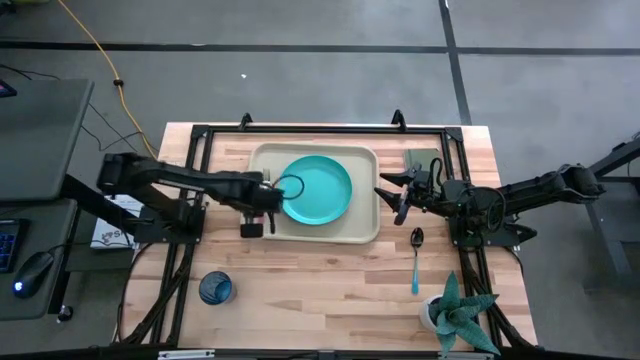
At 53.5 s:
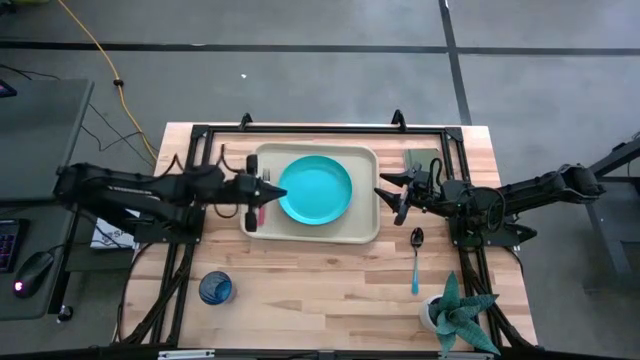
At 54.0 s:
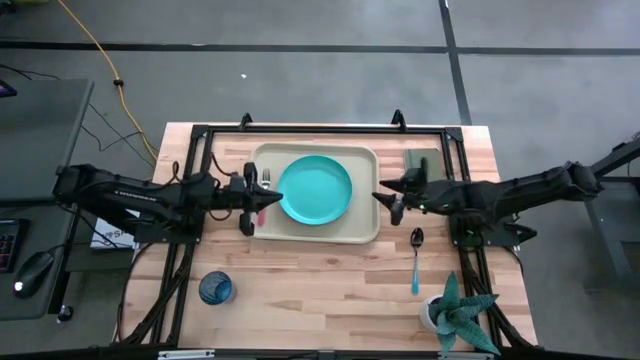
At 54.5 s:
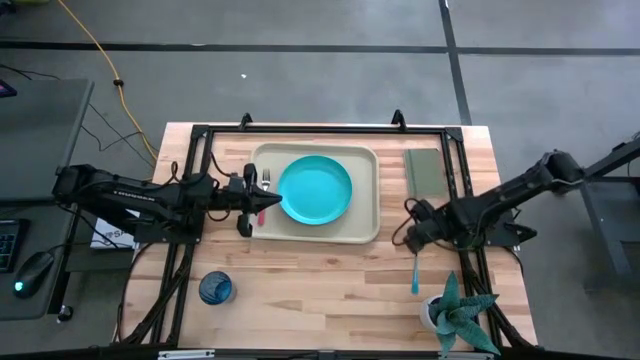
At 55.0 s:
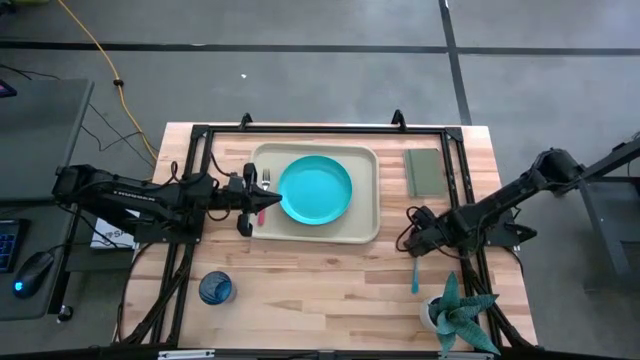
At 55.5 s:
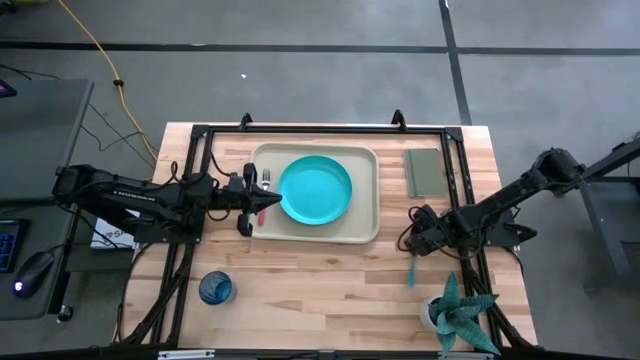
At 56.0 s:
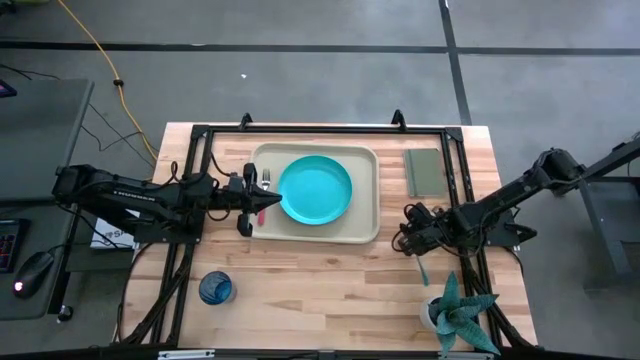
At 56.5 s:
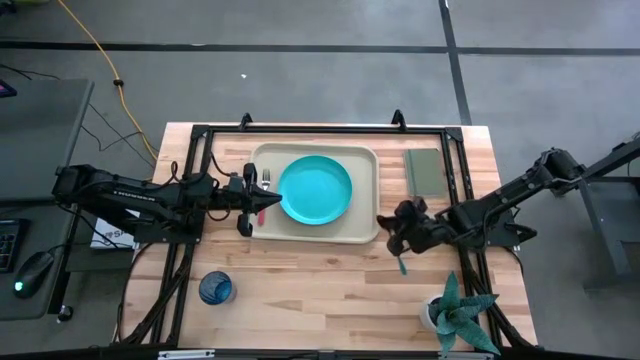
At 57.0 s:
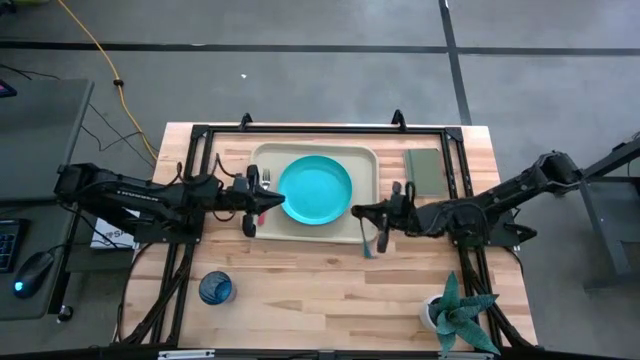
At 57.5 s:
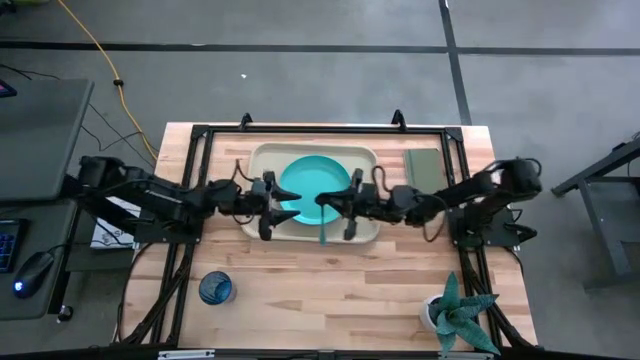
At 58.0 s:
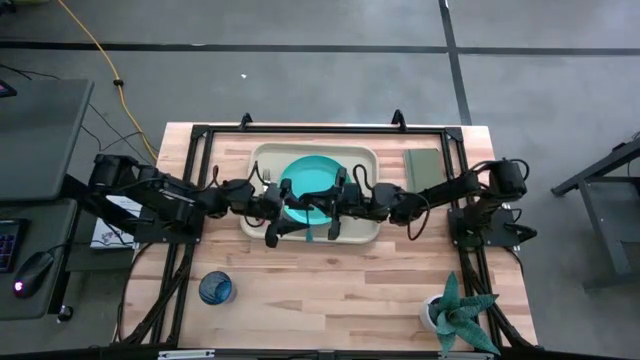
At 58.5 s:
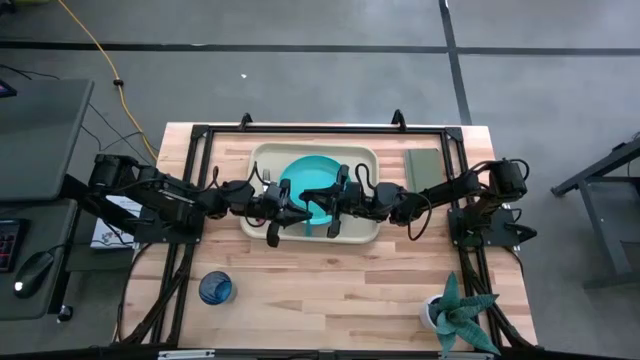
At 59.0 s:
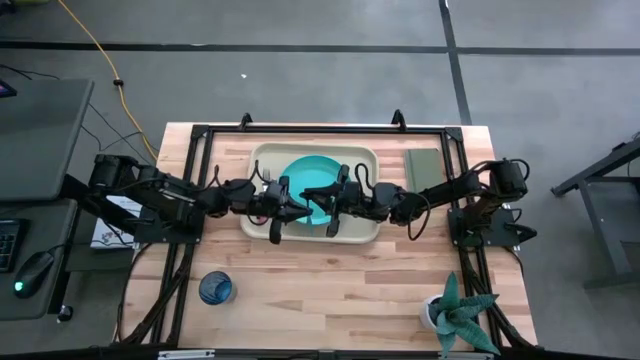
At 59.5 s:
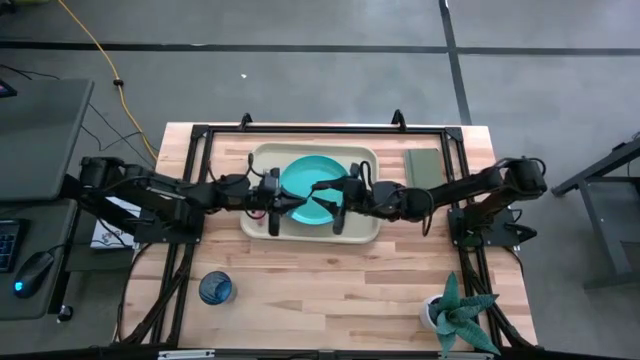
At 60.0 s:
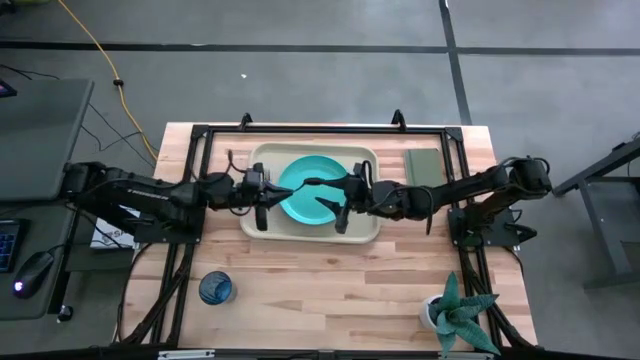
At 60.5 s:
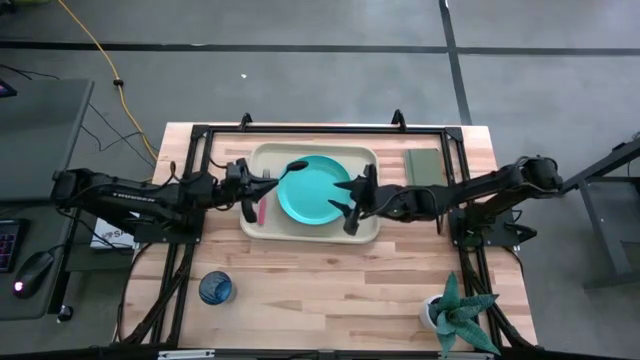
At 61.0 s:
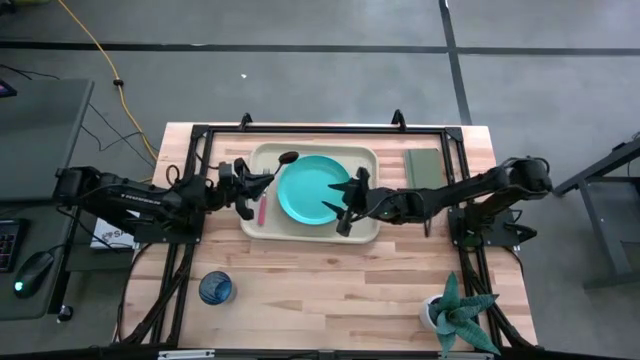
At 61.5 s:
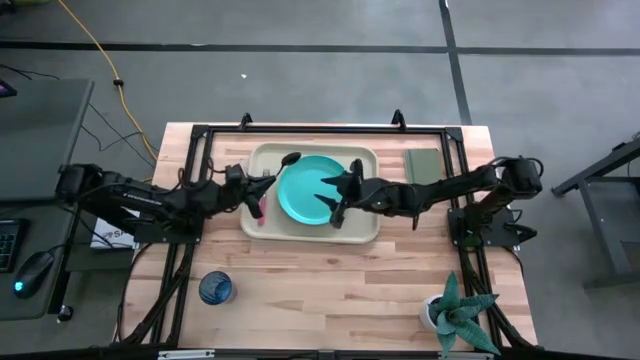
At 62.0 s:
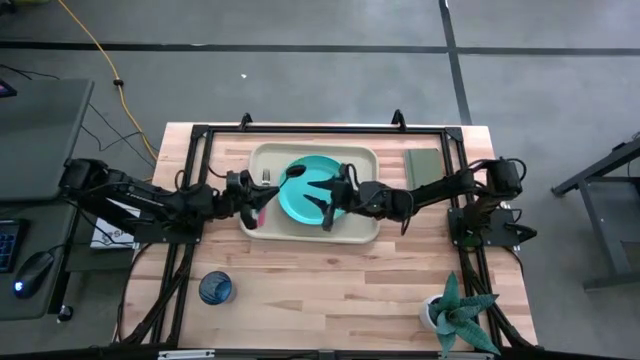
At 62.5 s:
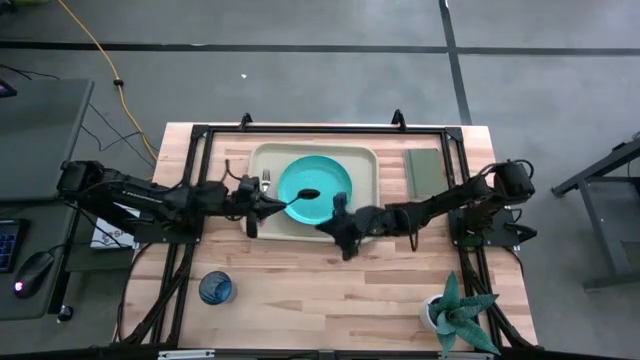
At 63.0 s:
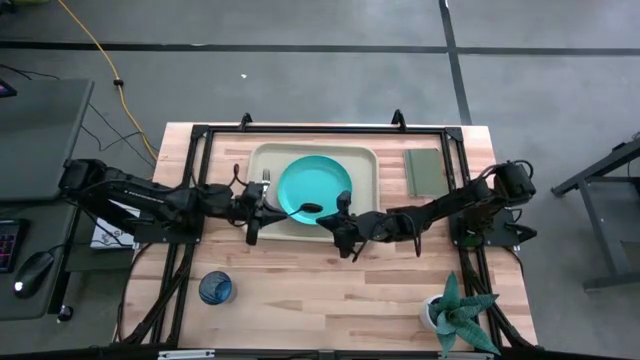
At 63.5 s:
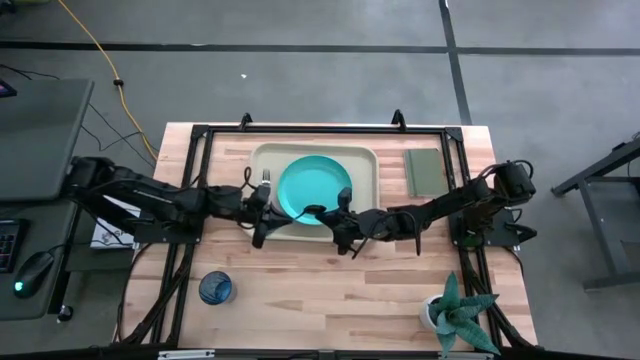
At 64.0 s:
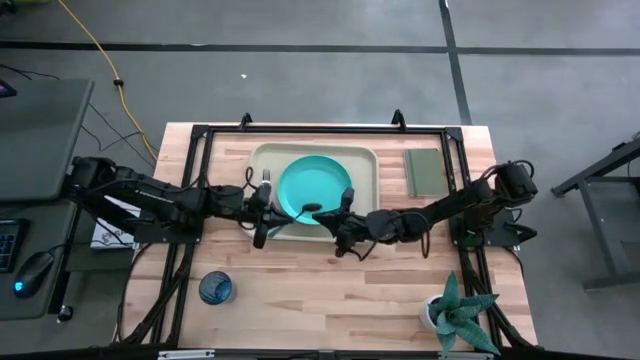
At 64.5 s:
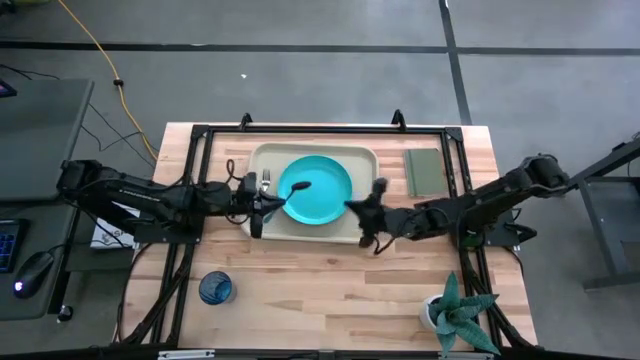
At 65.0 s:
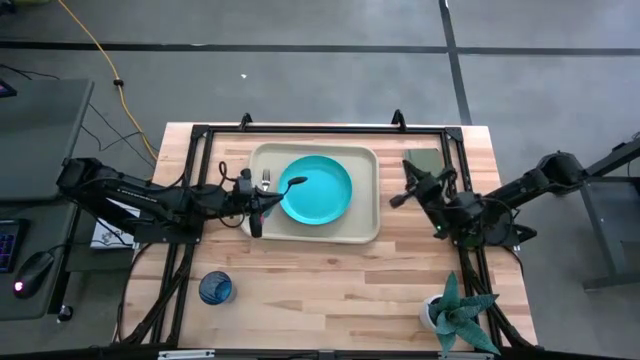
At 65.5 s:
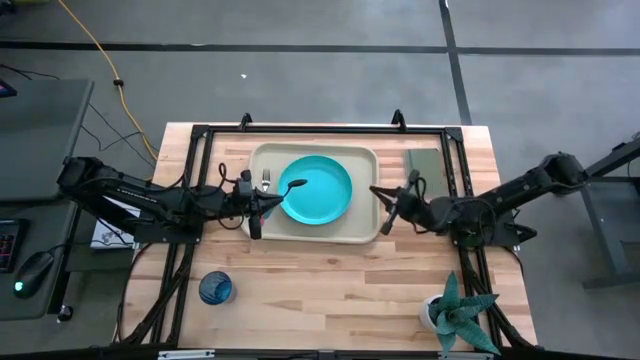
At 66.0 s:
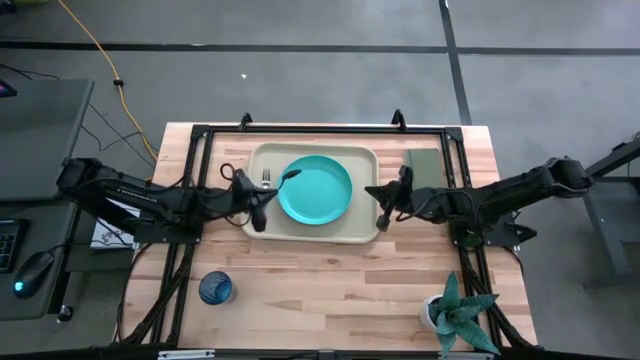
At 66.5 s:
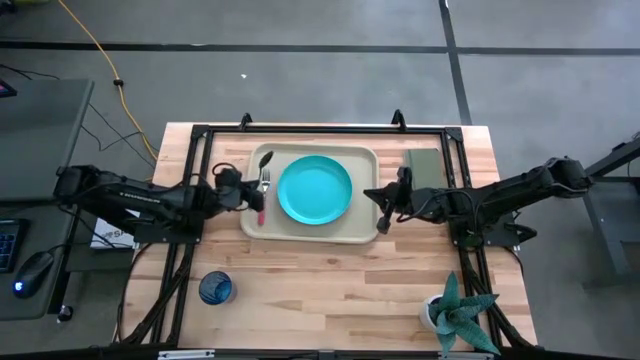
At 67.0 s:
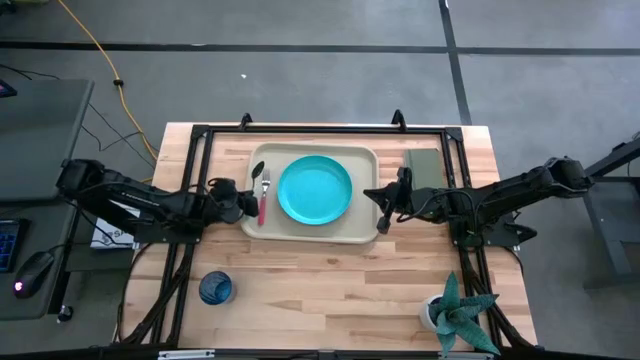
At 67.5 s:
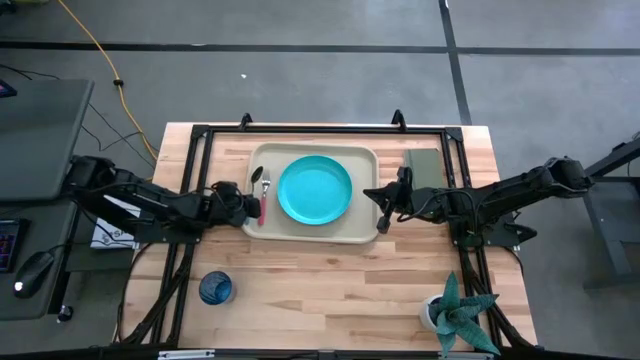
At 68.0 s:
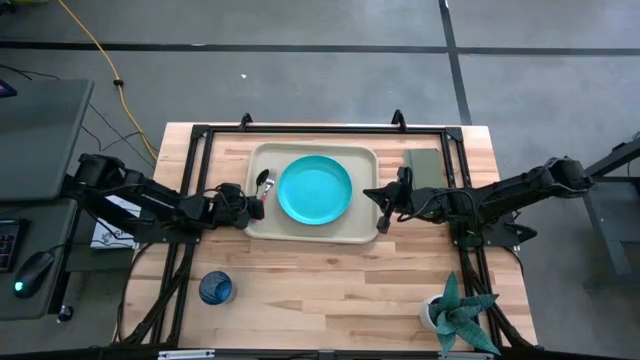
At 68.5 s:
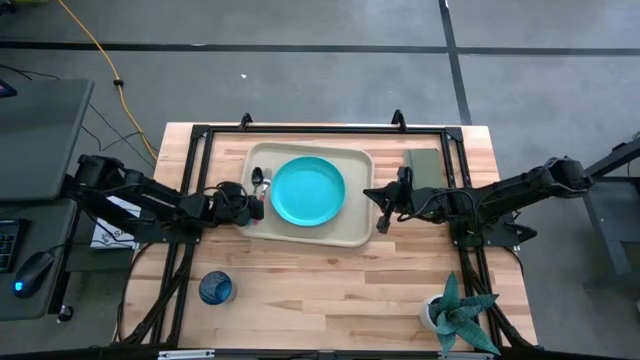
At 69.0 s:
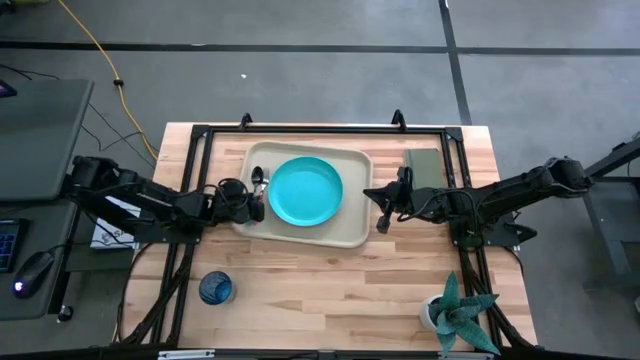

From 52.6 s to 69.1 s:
Task: Pick and place plate/cup/fork/spoon on tray
Put the blue spoon to the left of the pink fork on the light brown tray

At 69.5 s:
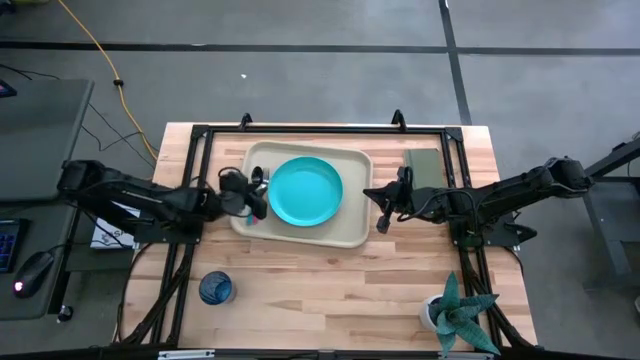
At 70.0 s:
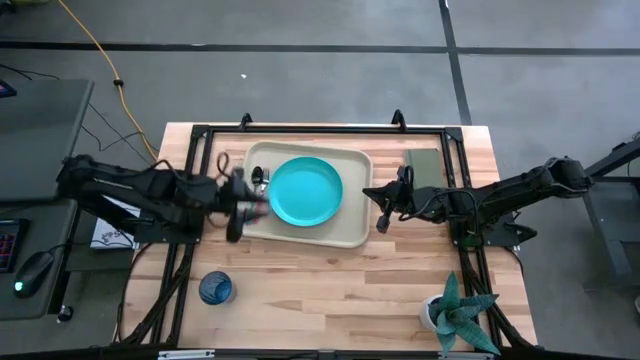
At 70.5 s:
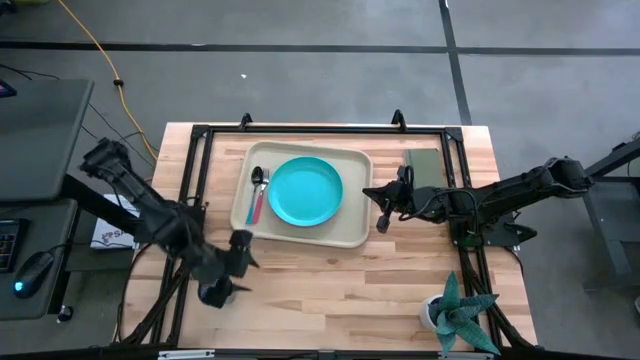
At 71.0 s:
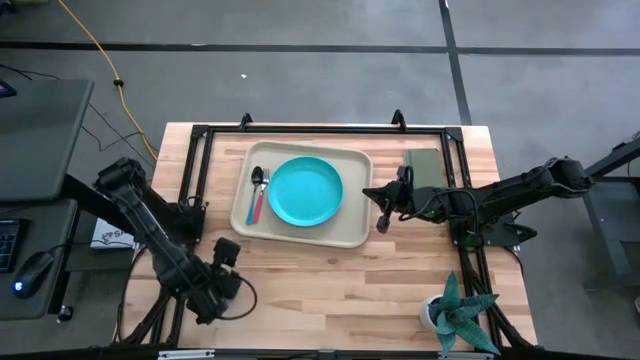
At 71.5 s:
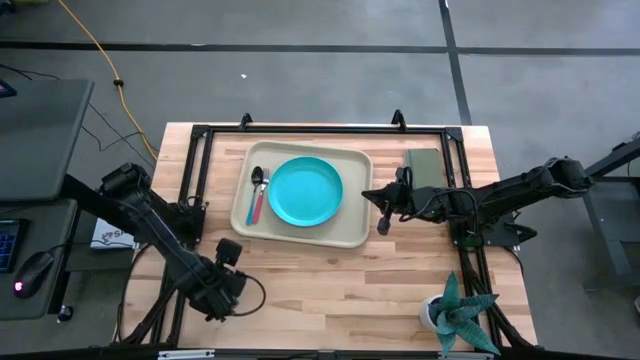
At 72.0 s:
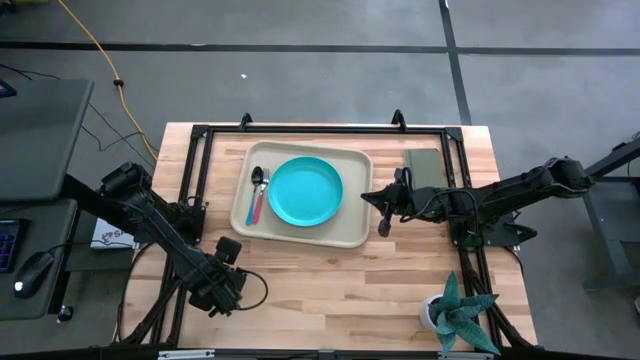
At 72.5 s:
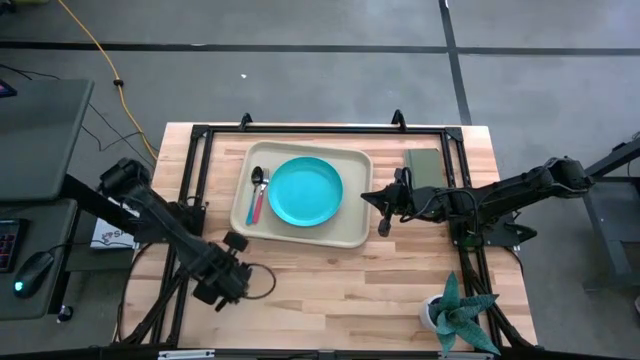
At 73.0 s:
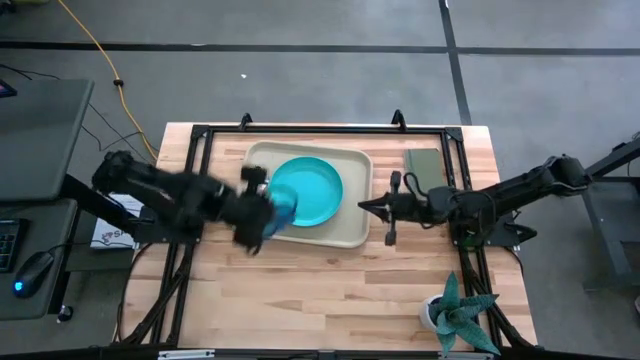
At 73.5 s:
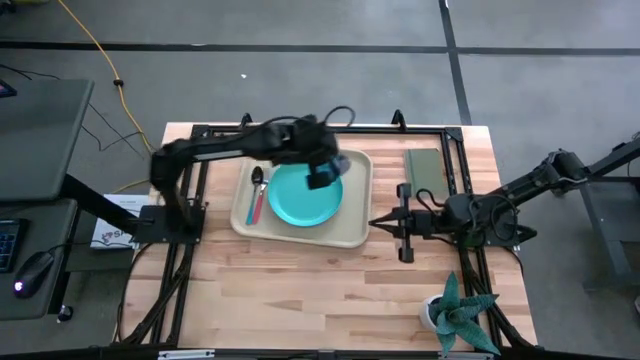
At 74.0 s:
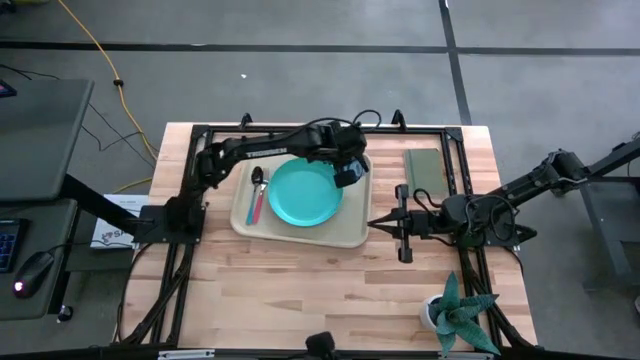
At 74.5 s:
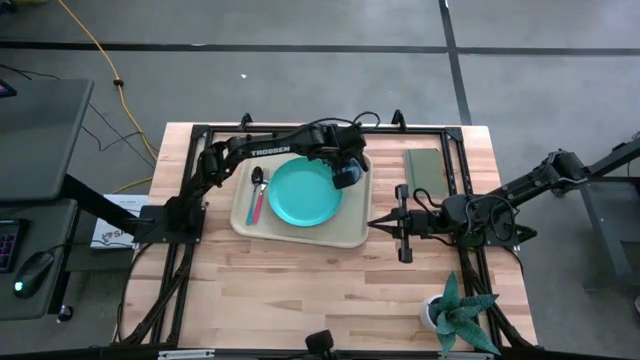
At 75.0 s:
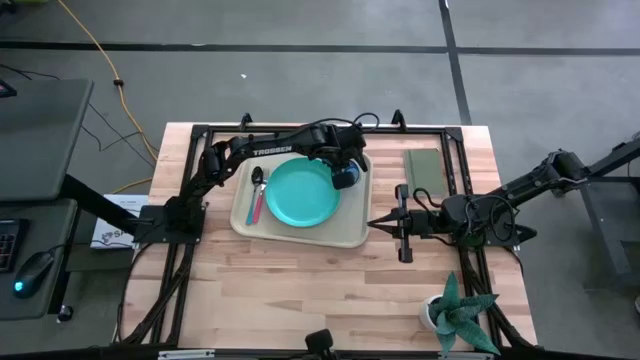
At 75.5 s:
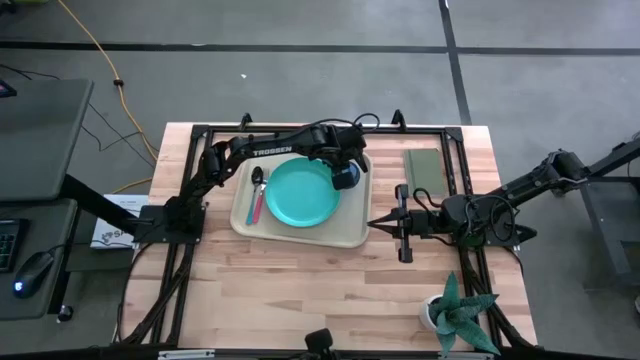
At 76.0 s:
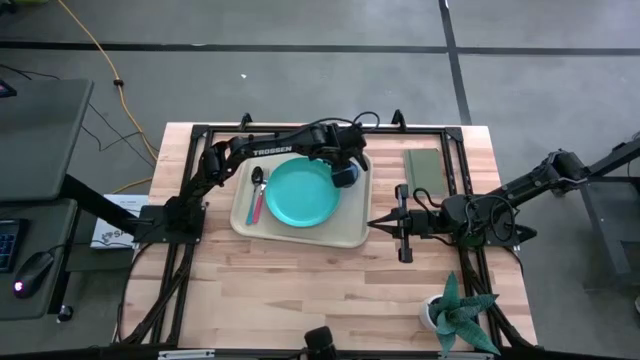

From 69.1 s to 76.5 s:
Put the blue glass to the top right of the blue plate on the light brown tray
